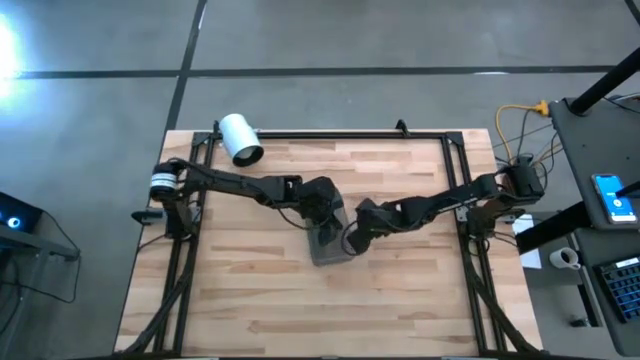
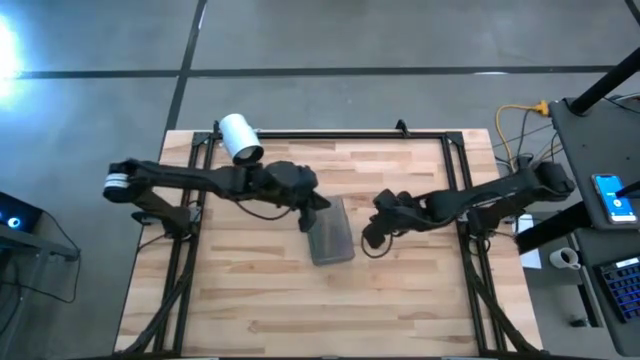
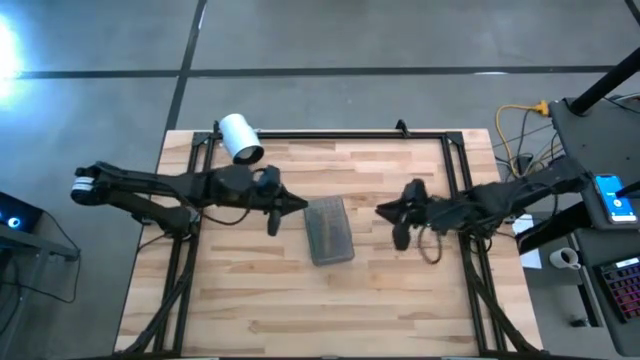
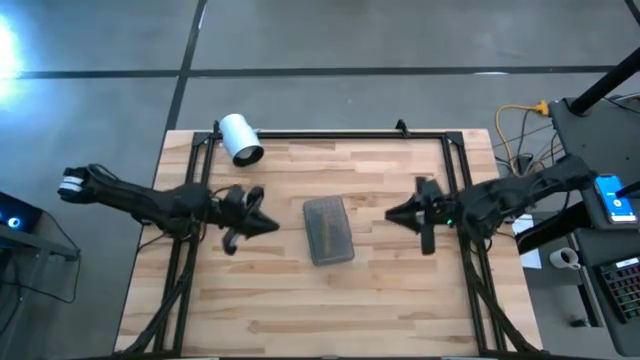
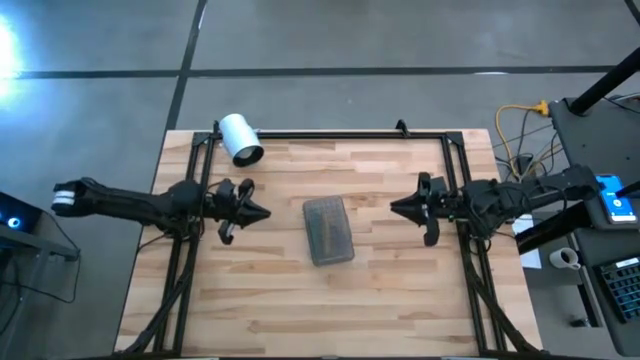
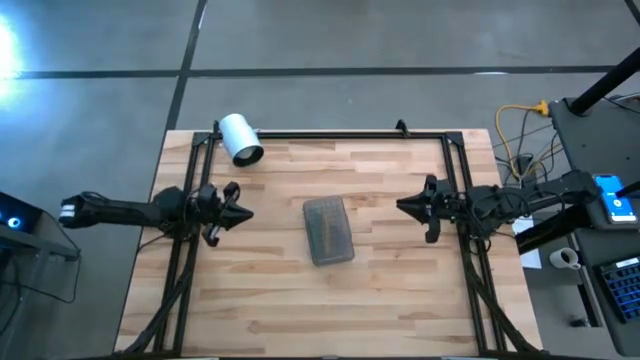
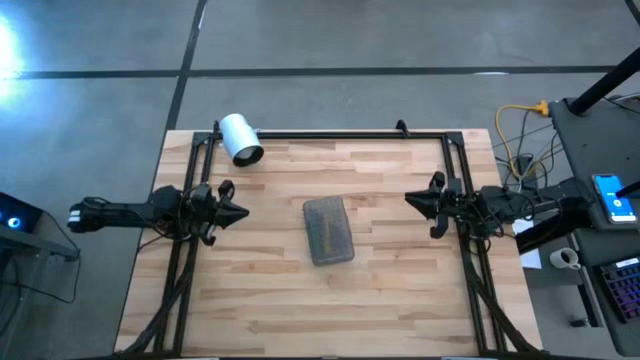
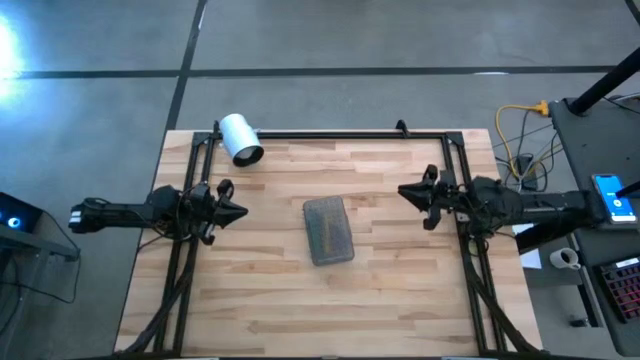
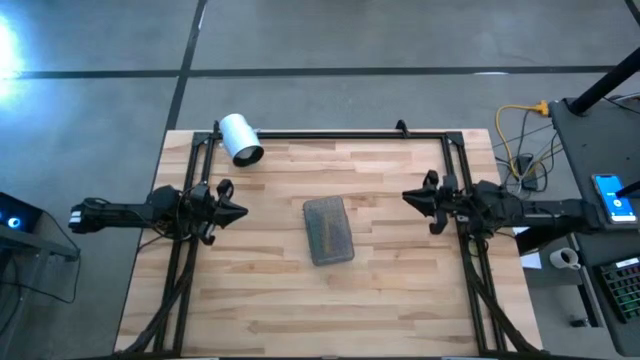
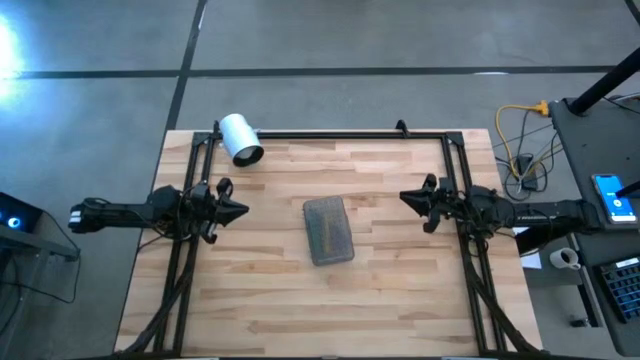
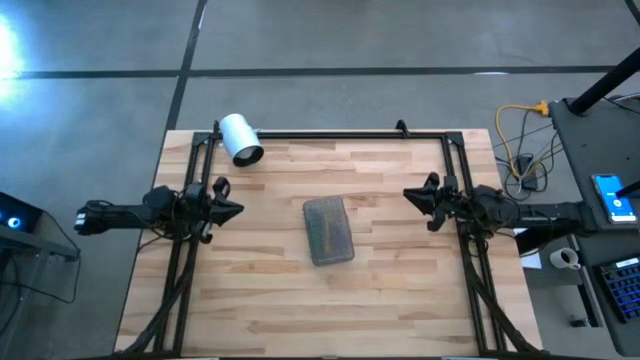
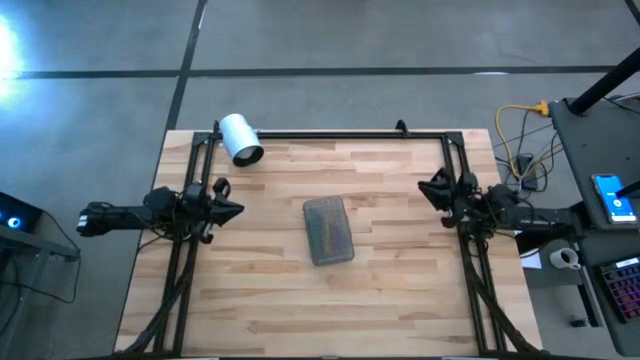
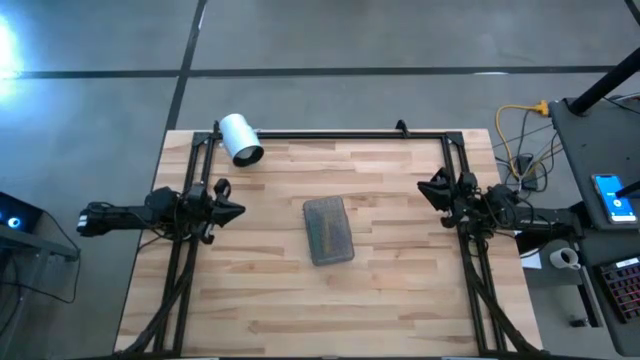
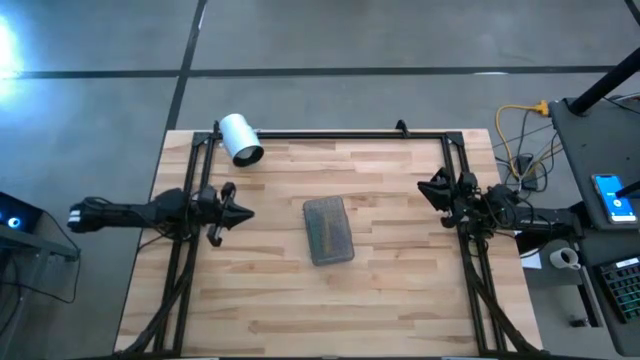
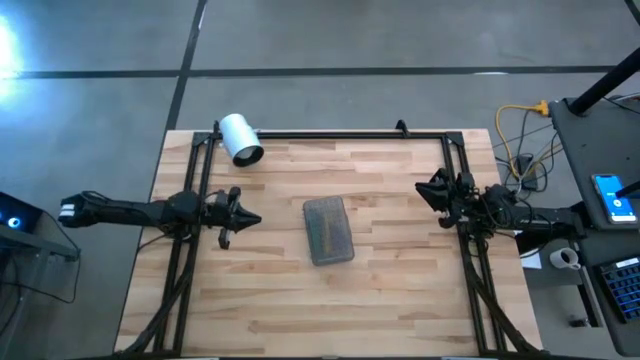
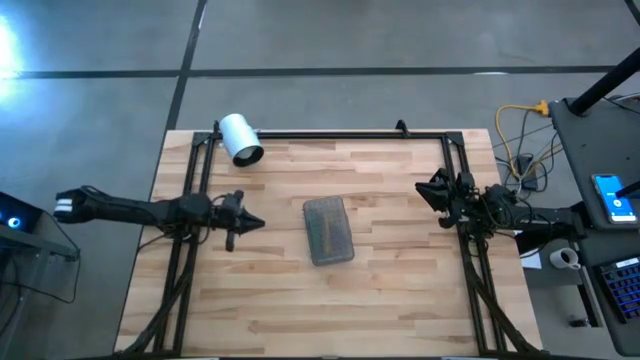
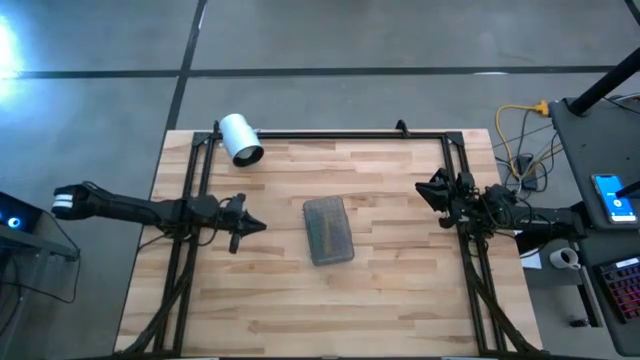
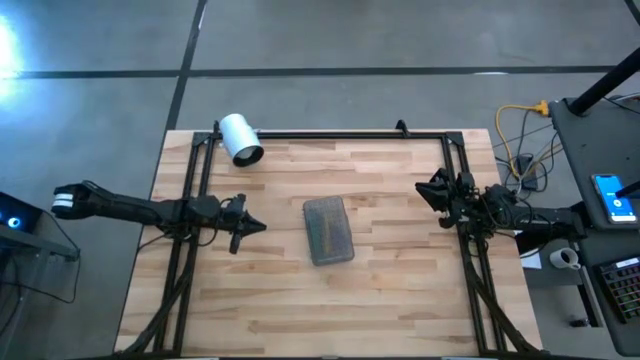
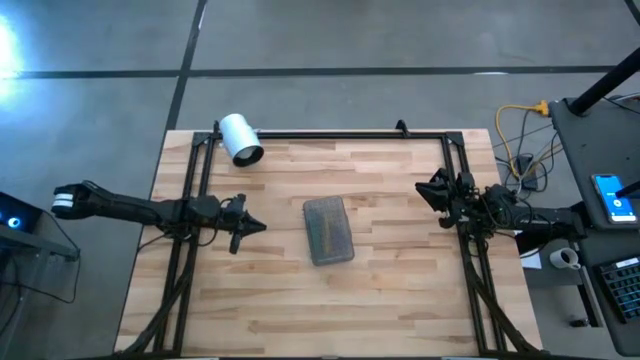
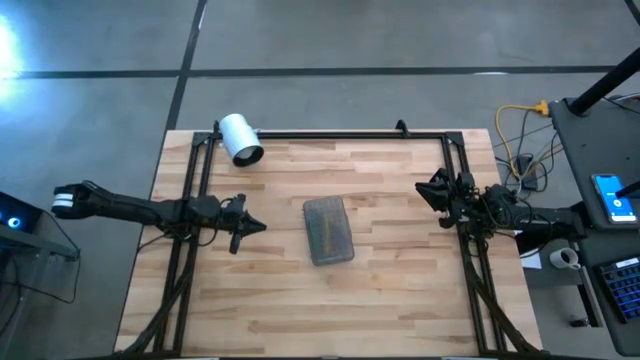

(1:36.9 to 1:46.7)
Task: Pick & place school supplies into a supply box
Return to Home Position

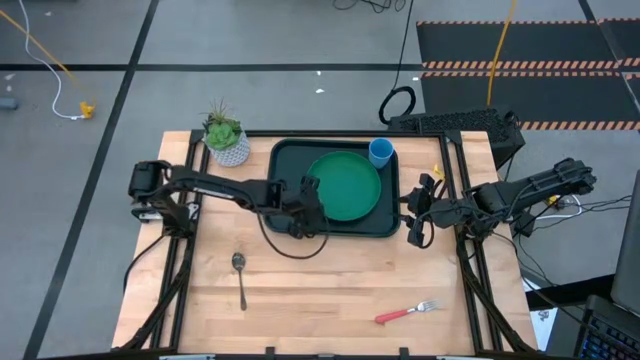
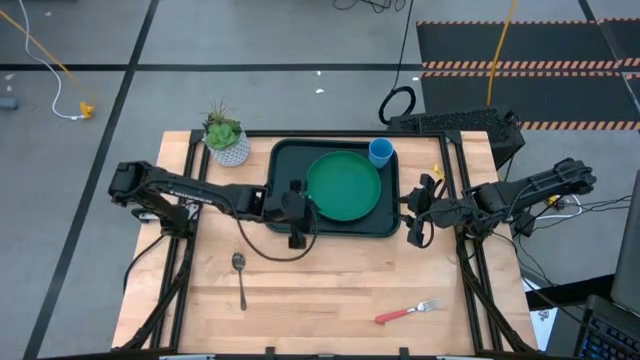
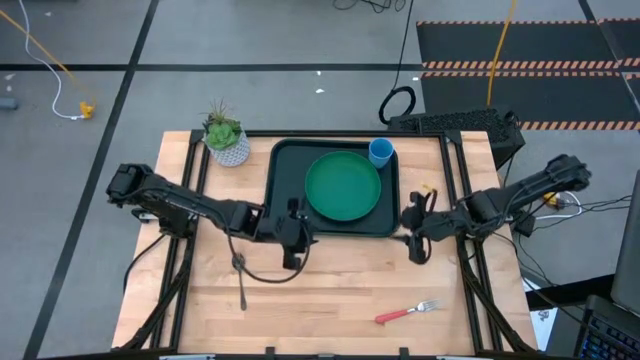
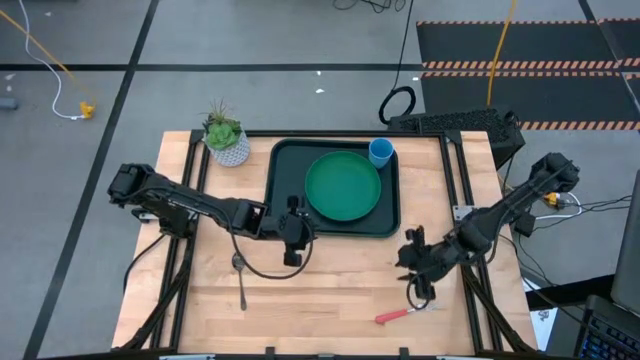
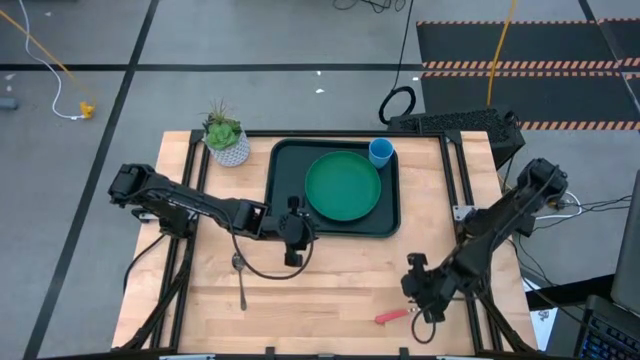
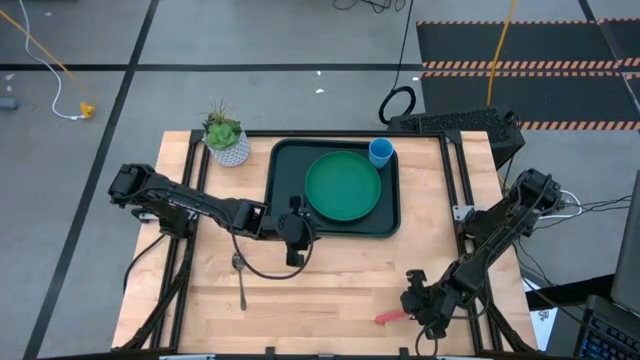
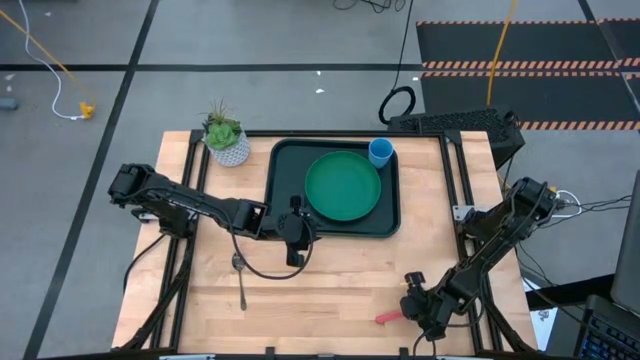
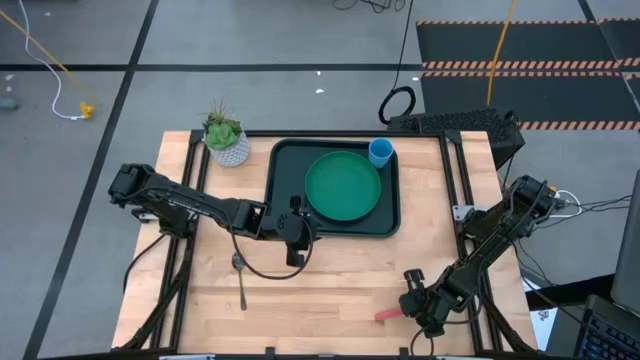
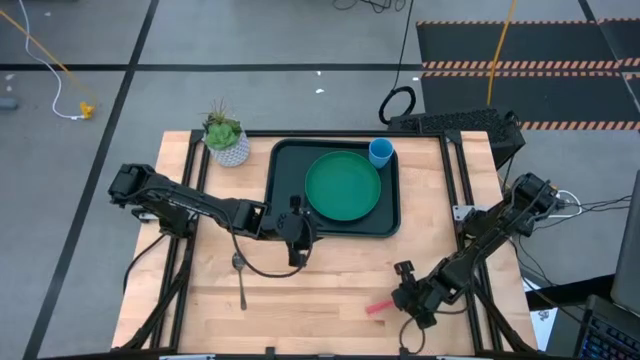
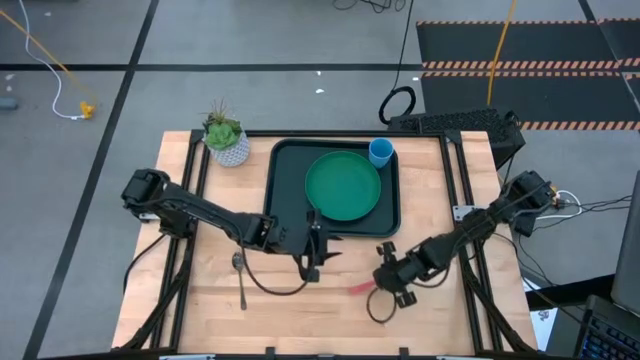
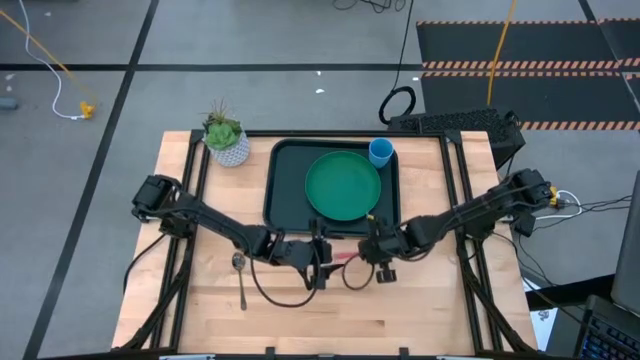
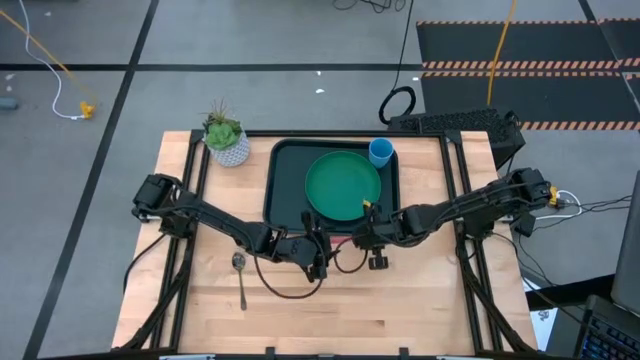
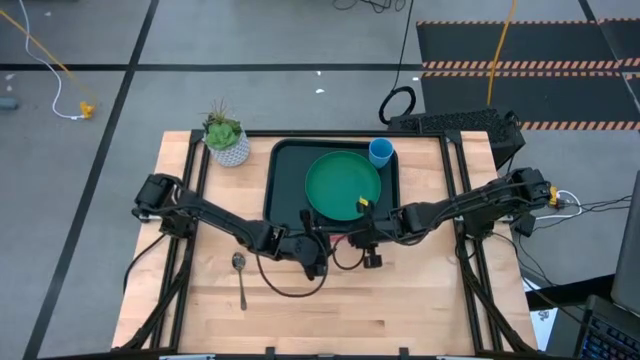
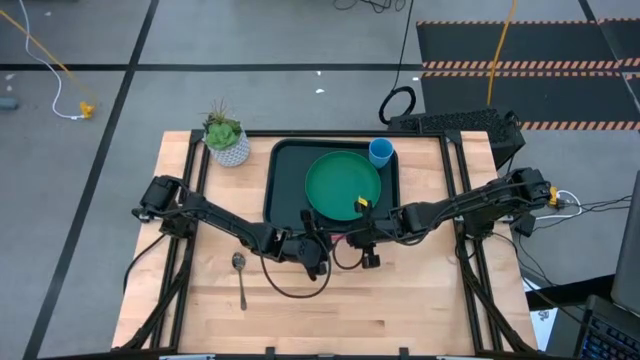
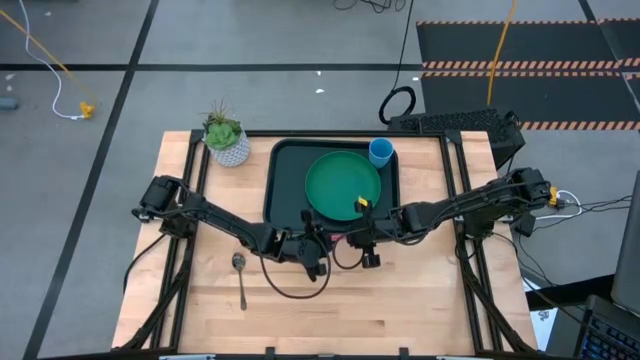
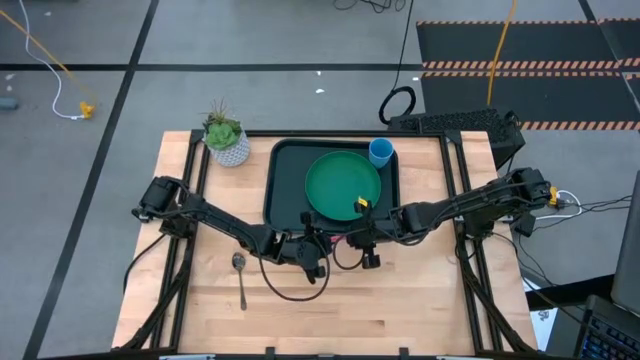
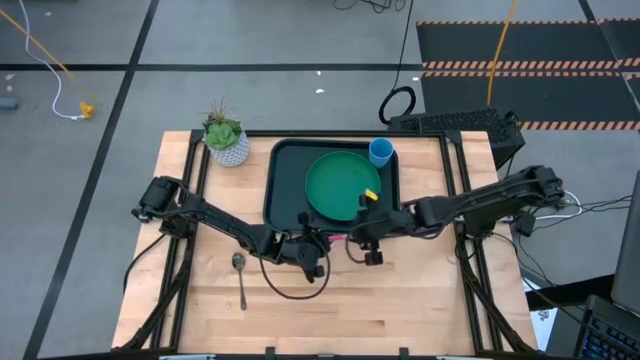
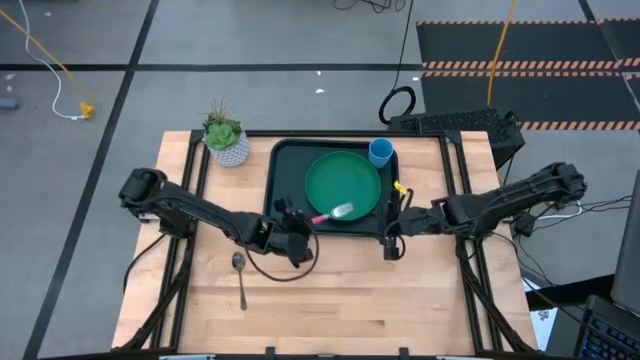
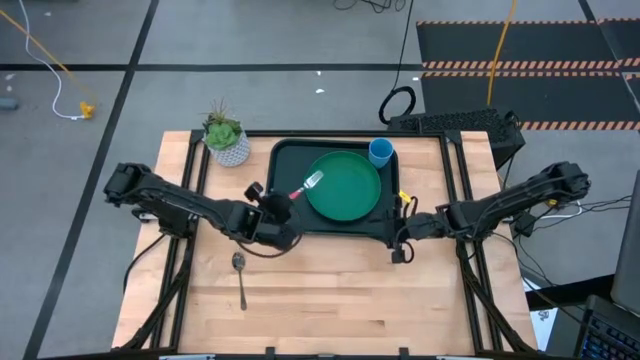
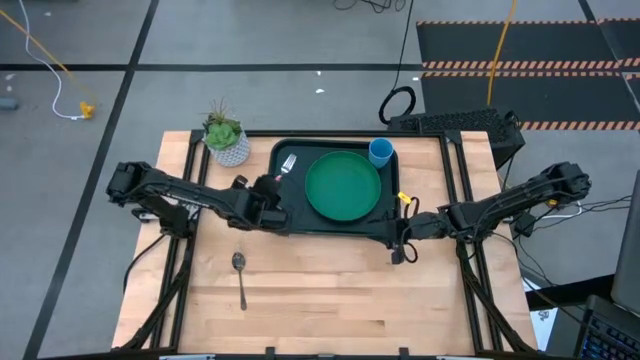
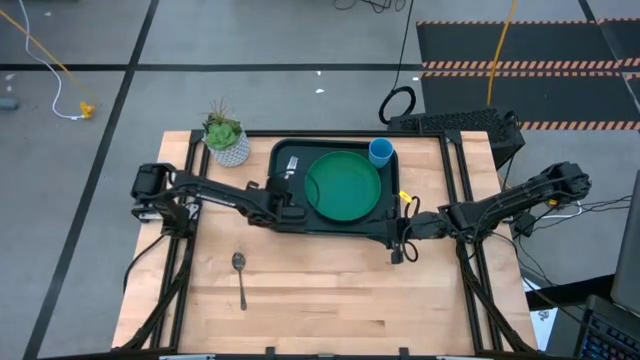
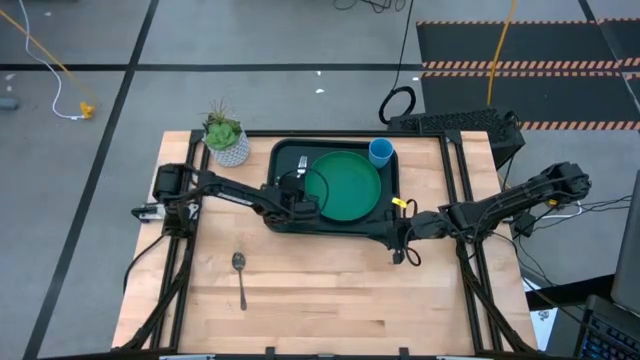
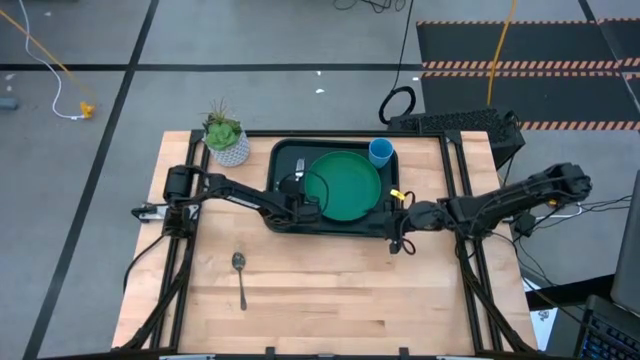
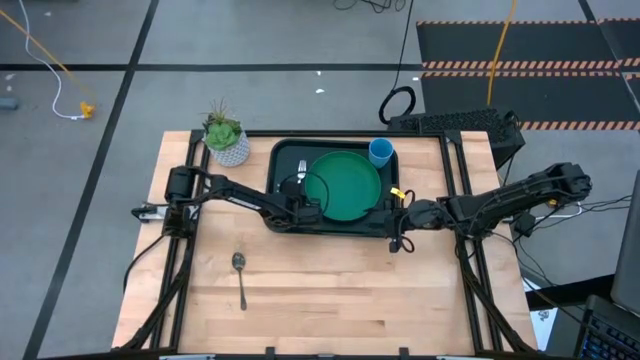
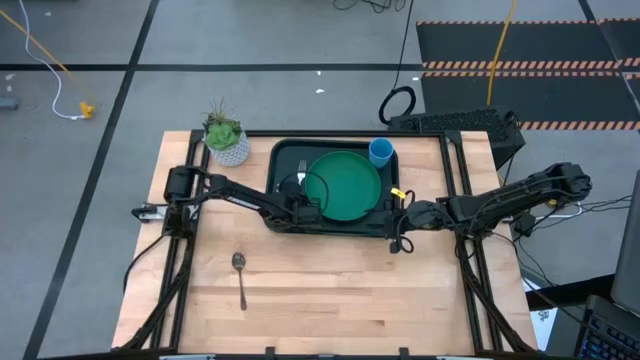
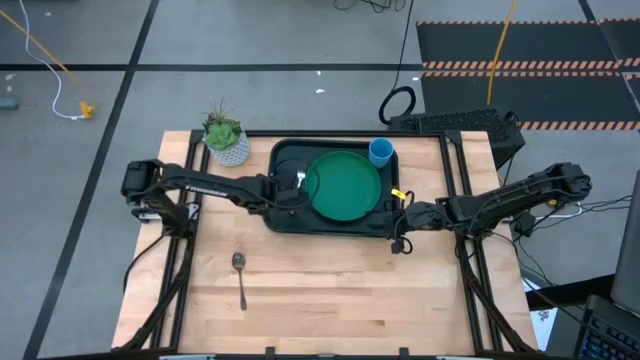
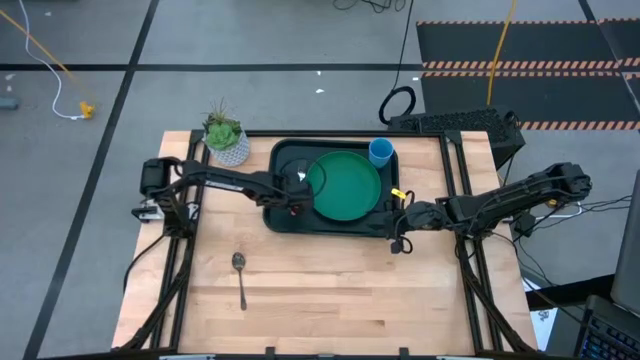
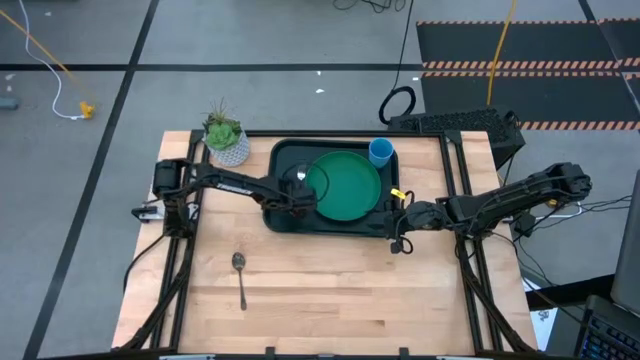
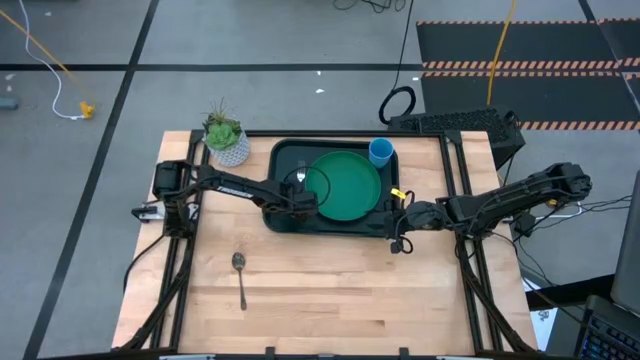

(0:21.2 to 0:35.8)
Task: Pick and place plate/cup/fork/spoon on tray
Put the orange fork on the black tray to the left of the green plate
